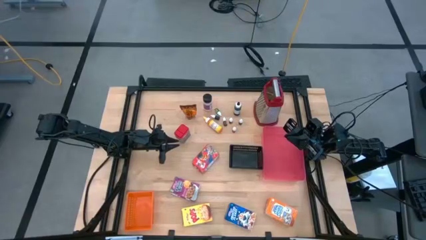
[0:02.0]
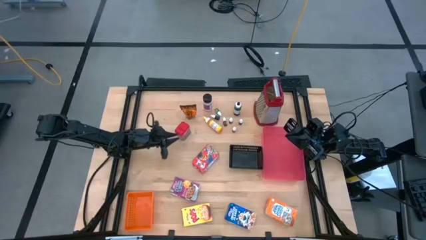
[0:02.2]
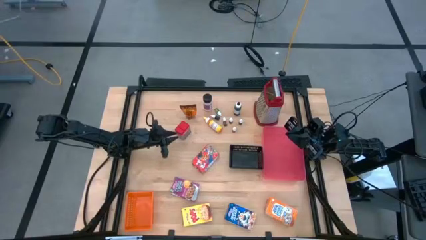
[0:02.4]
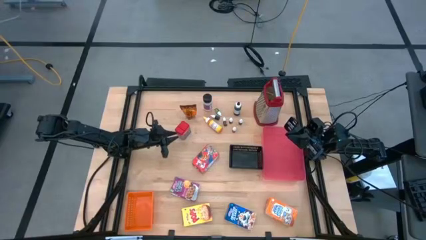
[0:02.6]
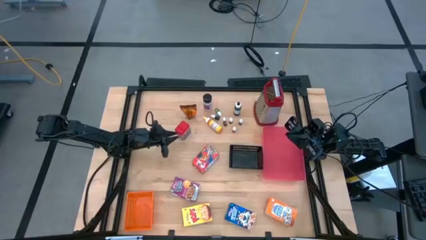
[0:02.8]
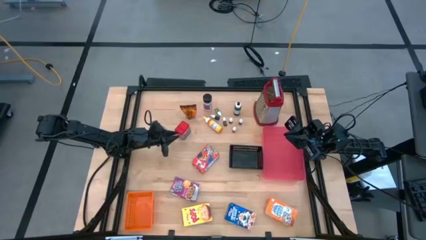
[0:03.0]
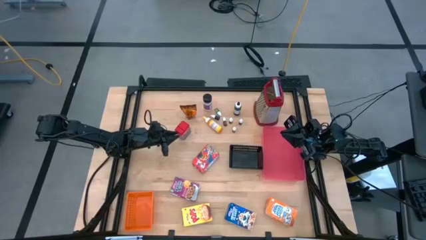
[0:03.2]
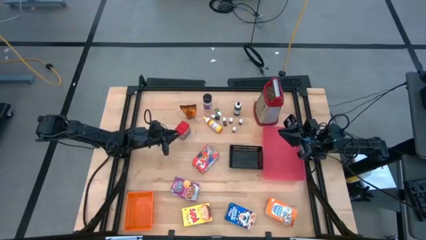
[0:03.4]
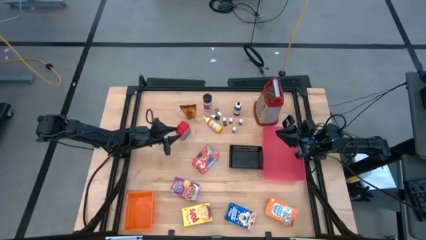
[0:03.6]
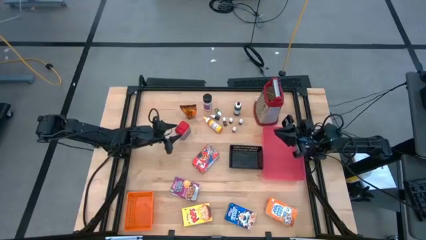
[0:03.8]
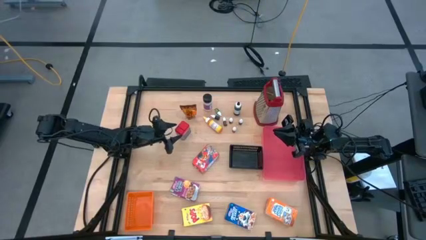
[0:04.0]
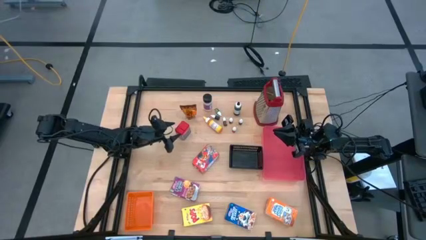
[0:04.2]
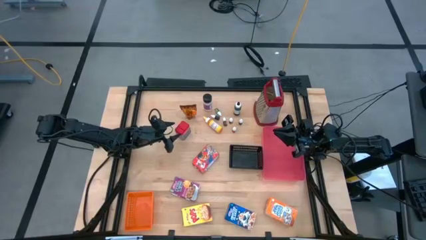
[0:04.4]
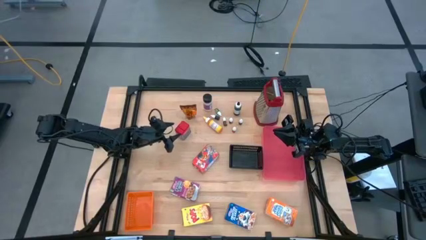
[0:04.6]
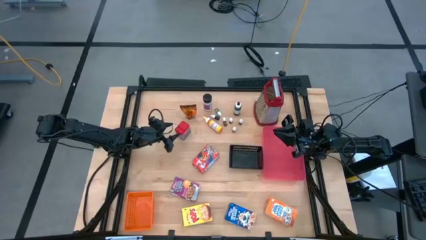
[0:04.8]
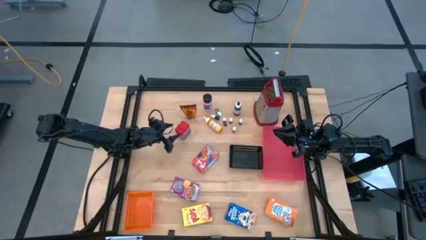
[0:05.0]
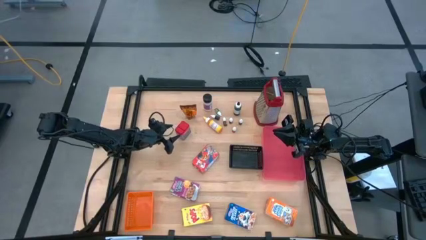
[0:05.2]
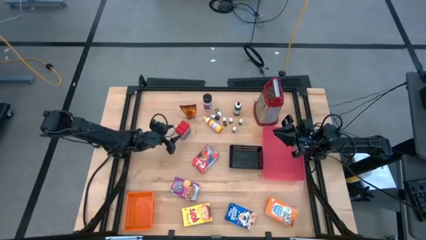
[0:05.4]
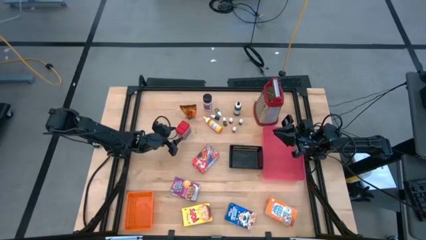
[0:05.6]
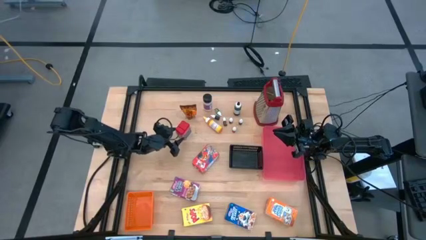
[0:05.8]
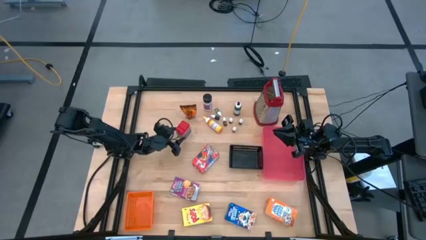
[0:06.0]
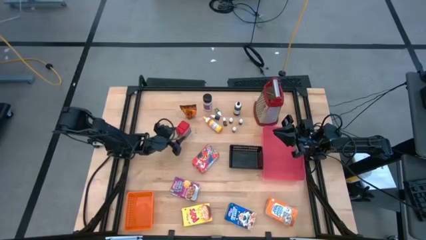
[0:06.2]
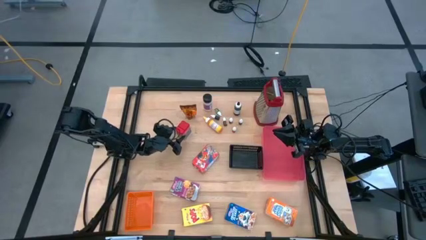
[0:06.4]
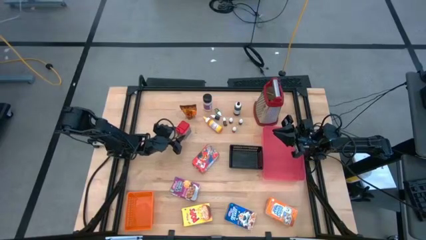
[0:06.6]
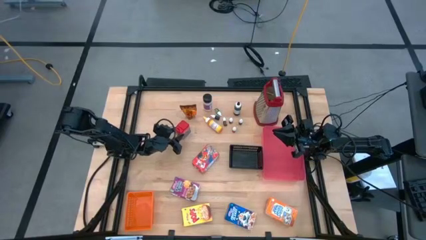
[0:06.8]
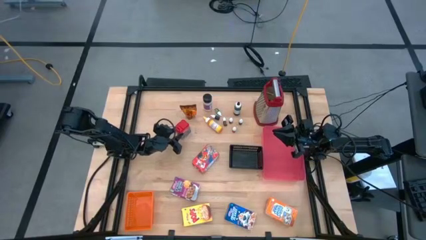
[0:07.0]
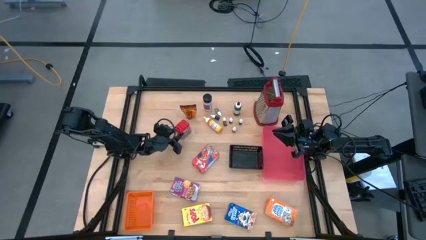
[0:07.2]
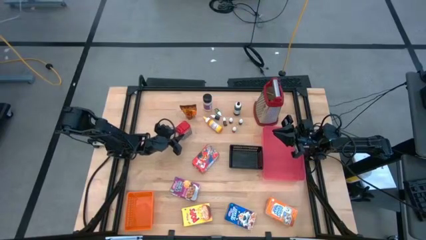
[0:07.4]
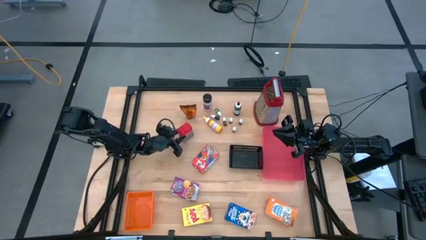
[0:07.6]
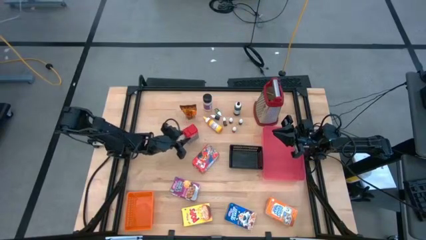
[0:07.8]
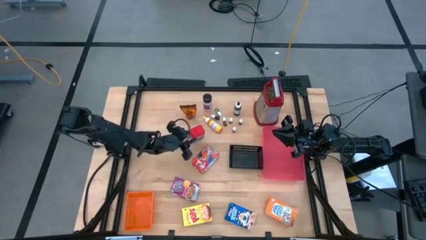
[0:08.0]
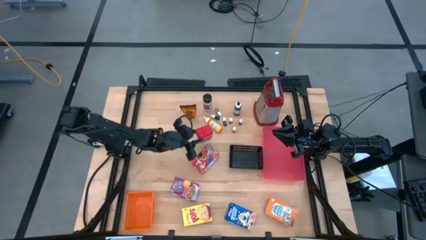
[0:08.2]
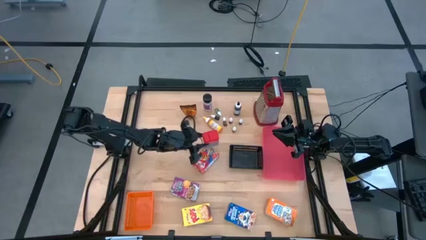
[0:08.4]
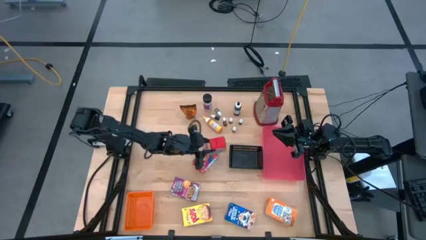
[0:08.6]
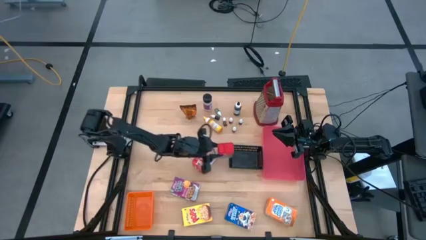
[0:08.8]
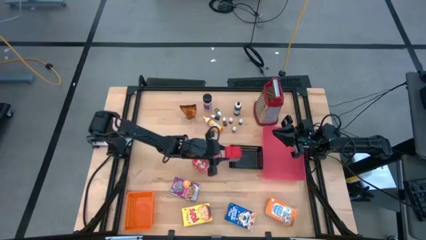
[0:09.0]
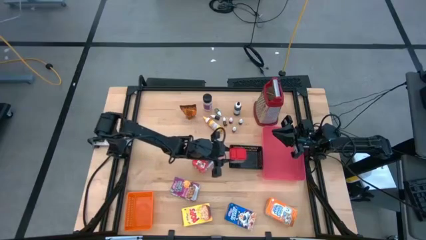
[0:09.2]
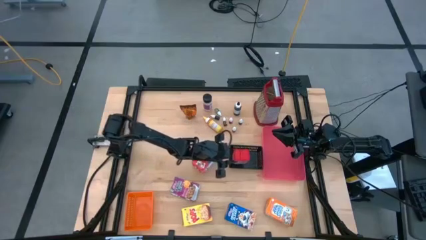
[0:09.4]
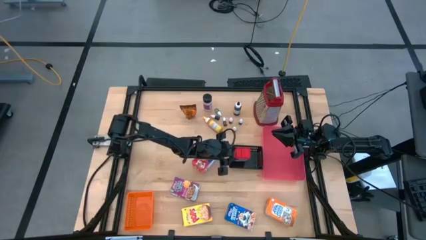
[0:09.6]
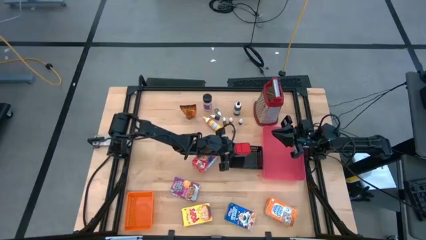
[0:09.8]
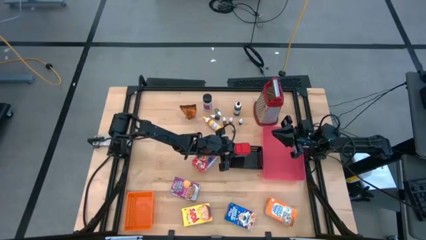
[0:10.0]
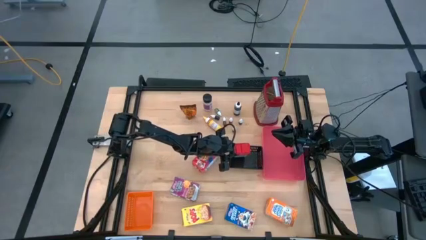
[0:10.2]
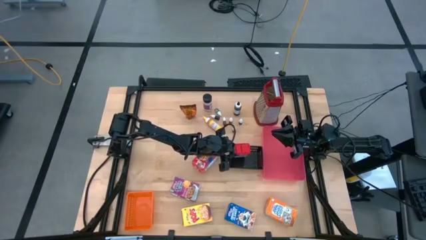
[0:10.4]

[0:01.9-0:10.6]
Task: Pick & Place Kitchen Items
Put the red seasoning can into the black bin

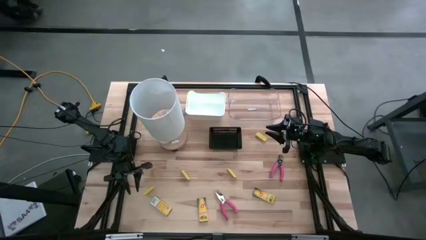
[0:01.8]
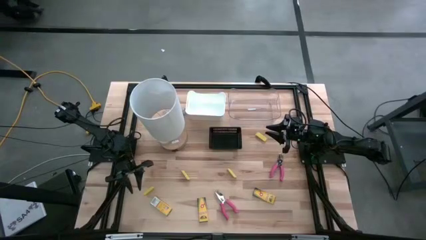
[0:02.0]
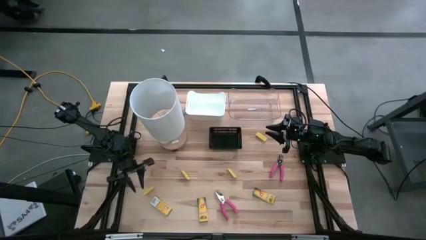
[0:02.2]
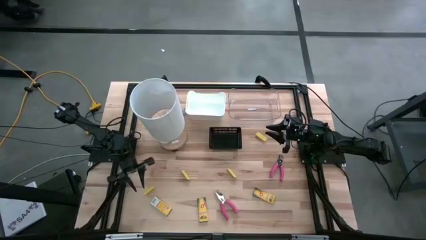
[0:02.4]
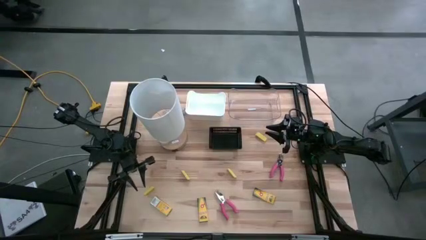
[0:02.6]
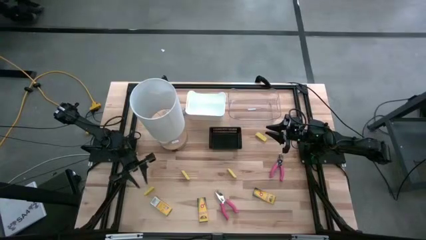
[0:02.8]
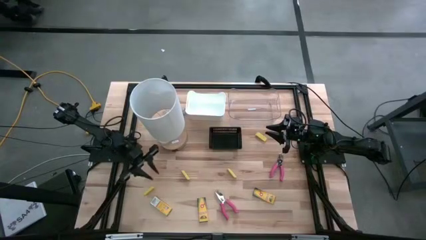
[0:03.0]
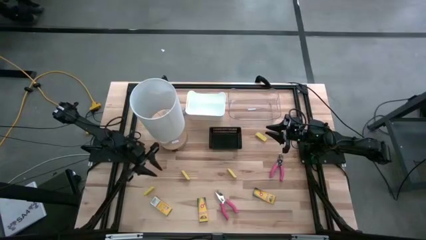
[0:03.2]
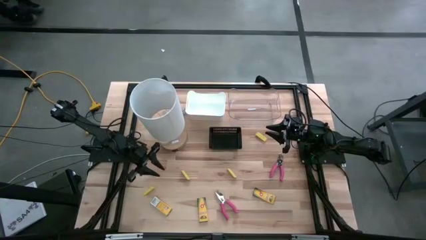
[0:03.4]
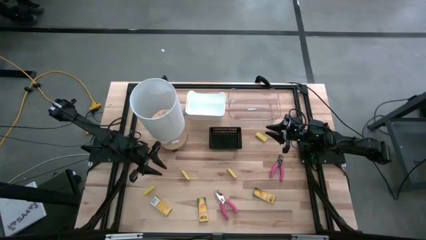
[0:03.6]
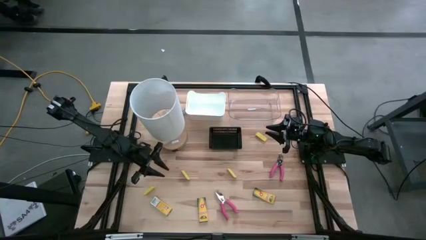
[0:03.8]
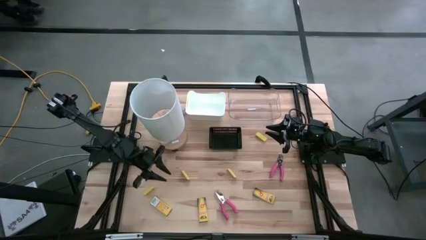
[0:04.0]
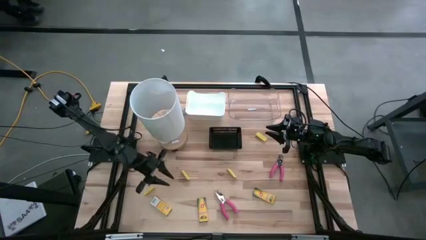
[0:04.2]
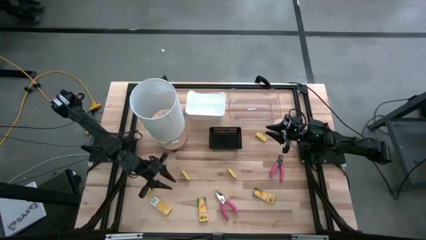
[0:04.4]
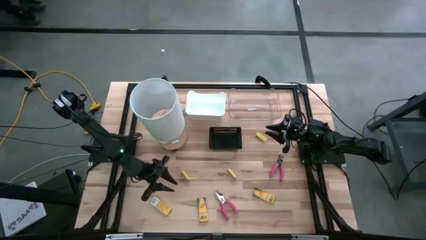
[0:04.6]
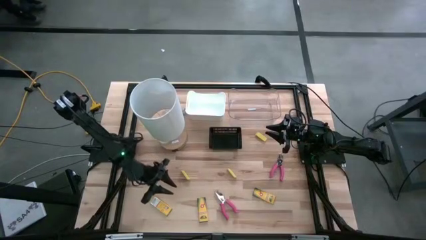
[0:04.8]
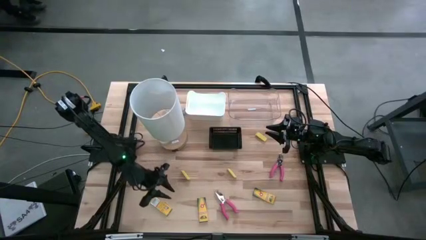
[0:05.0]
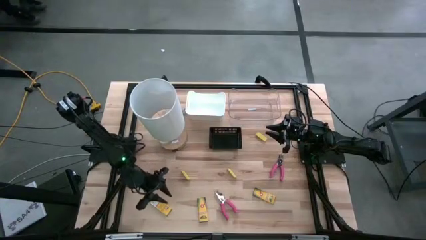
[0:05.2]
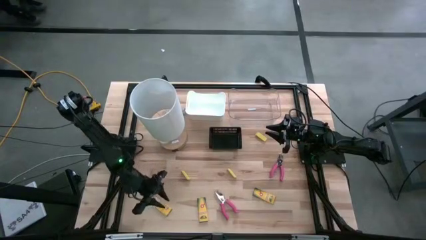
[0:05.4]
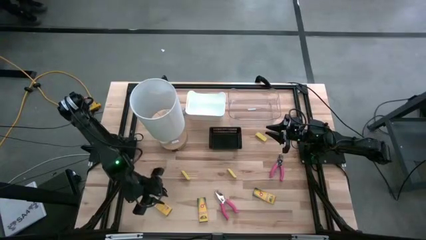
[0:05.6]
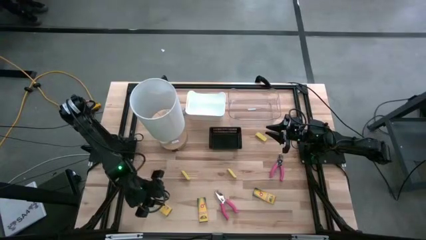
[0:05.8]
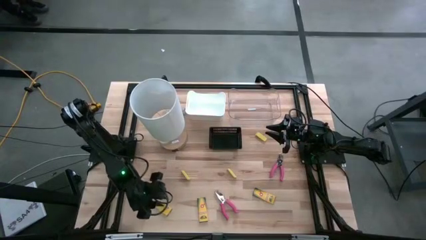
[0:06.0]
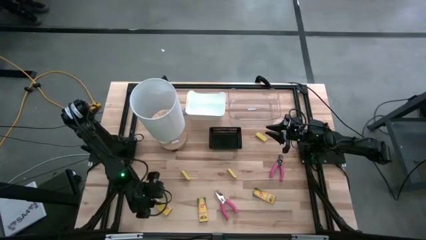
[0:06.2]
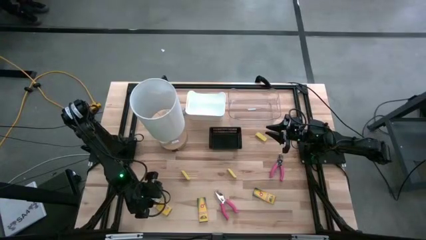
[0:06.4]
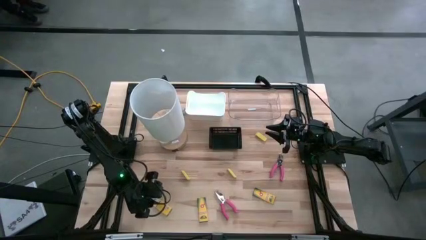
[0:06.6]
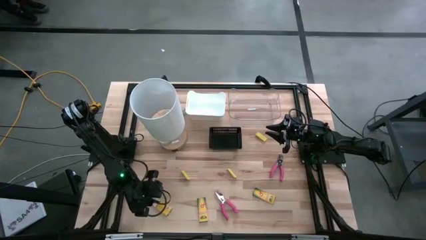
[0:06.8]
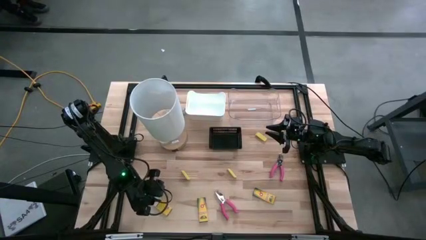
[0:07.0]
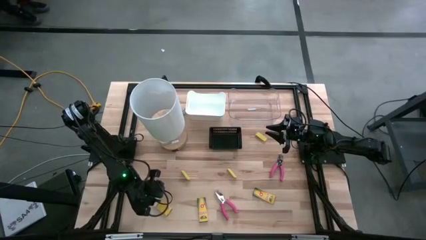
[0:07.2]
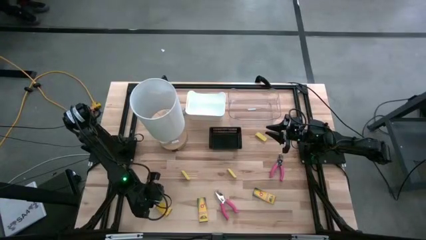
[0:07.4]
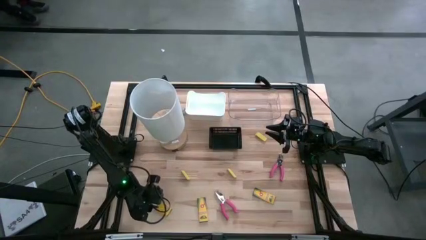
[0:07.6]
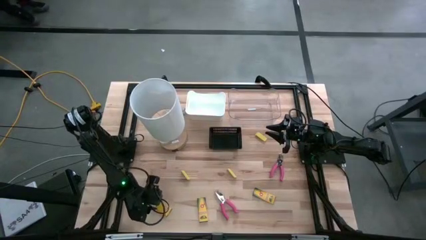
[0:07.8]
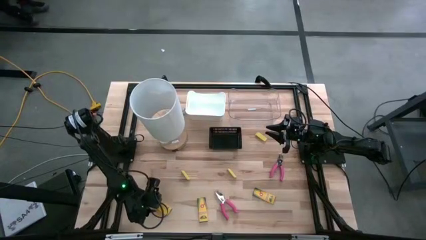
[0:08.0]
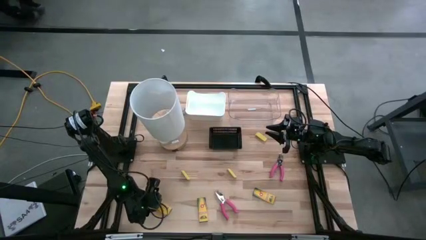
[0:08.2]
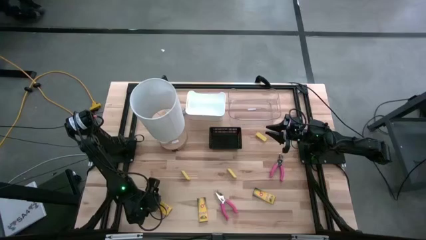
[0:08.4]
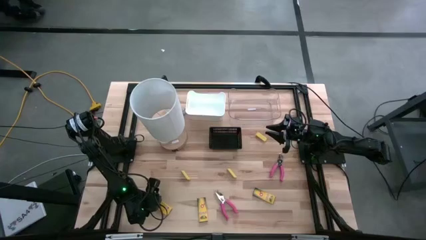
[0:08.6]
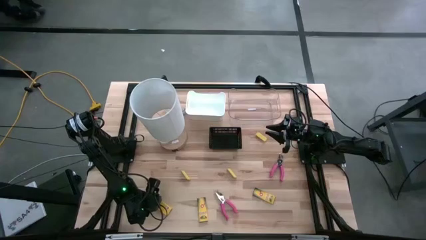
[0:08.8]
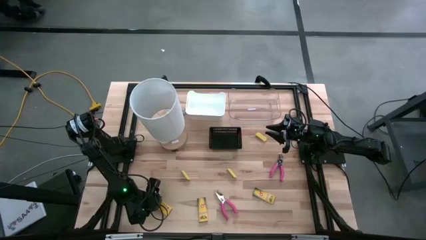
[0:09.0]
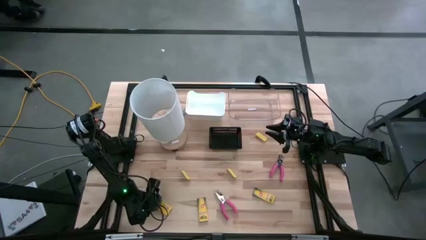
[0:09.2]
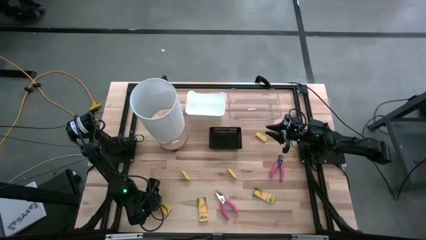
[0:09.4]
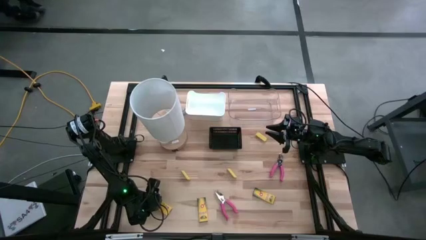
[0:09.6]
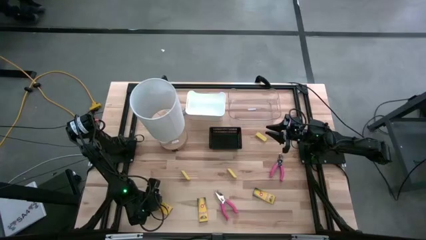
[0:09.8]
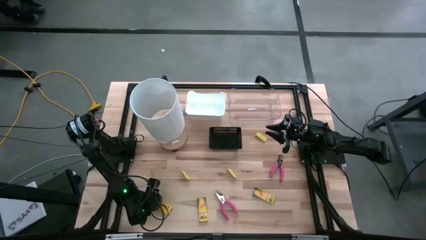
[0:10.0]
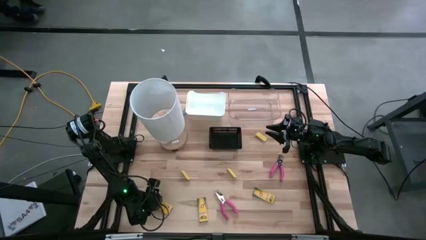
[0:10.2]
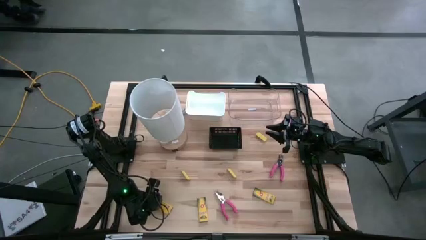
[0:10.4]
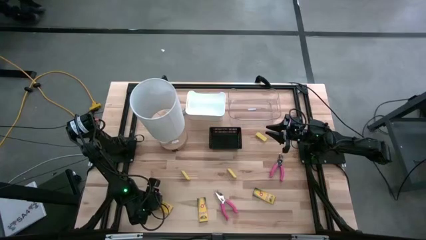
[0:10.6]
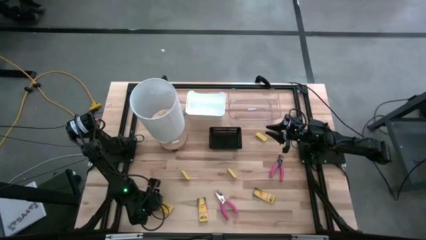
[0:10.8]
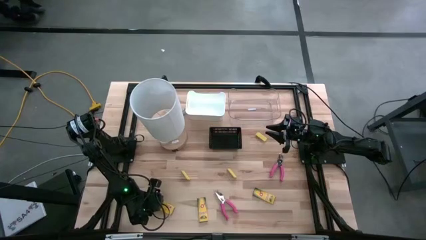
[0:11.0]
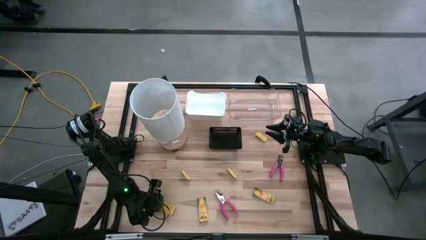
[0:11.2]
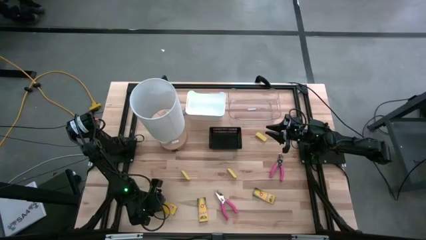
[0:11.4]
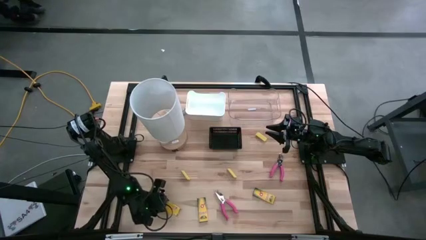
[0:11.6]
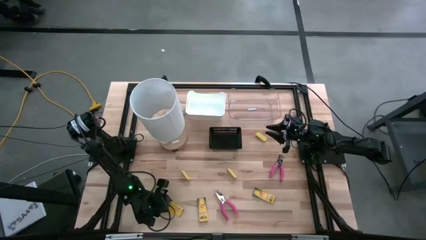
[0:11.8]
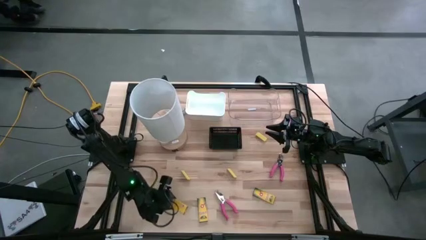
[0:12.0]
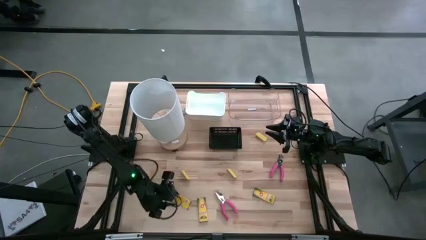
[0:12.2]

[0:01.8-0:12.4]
Task: Pick & Place School Supplies
Put the yellow crayon box into the white bin
